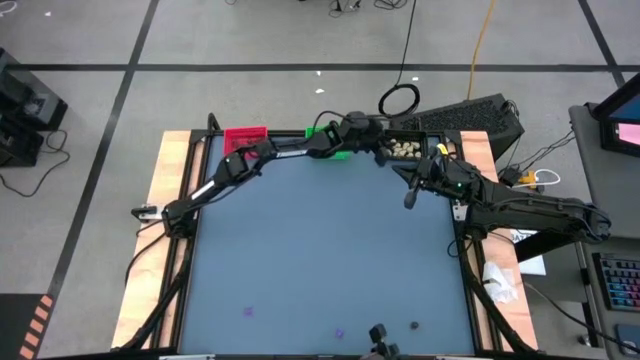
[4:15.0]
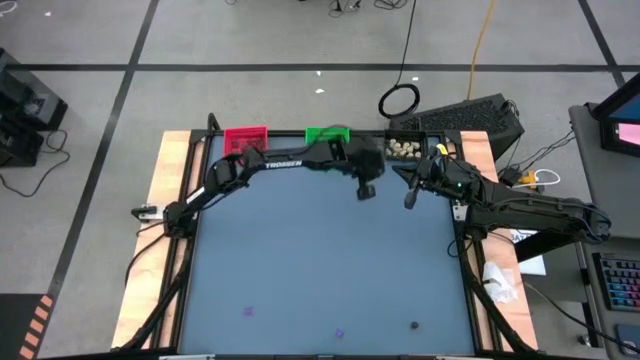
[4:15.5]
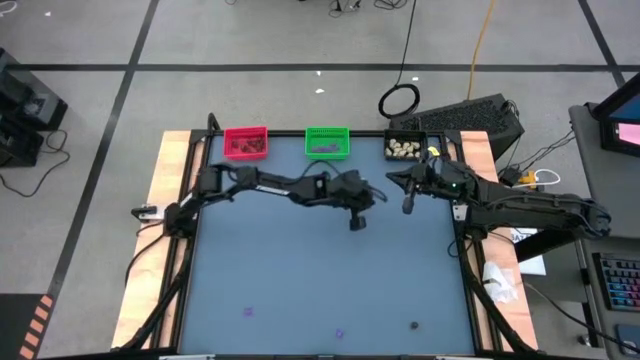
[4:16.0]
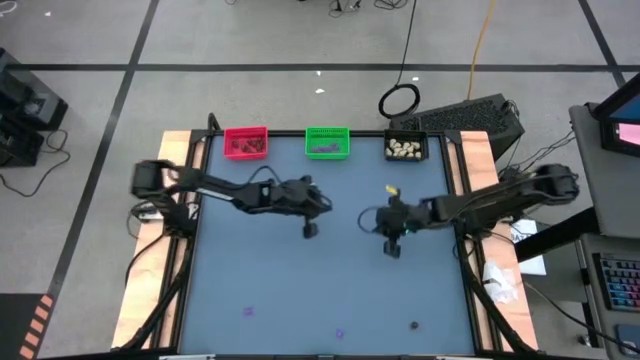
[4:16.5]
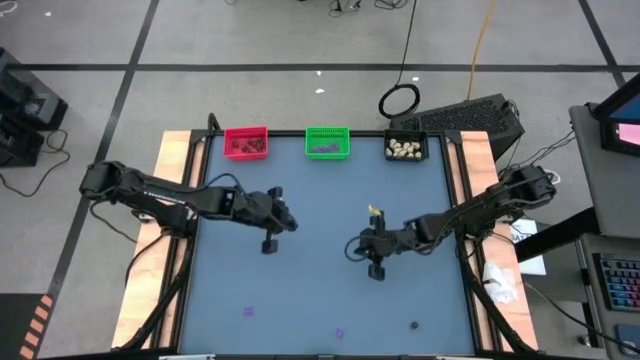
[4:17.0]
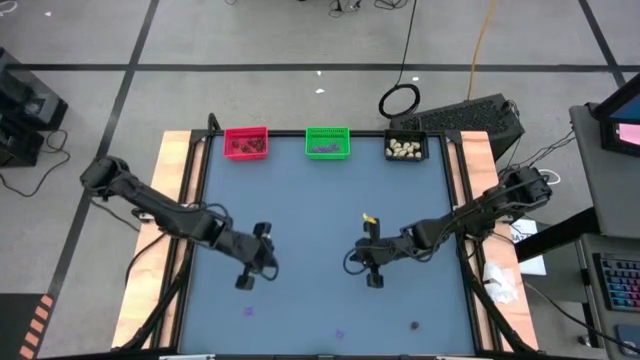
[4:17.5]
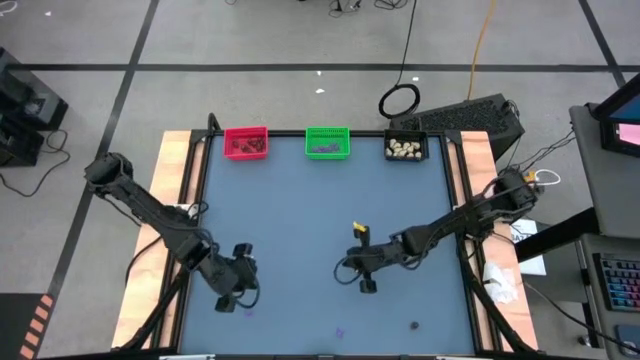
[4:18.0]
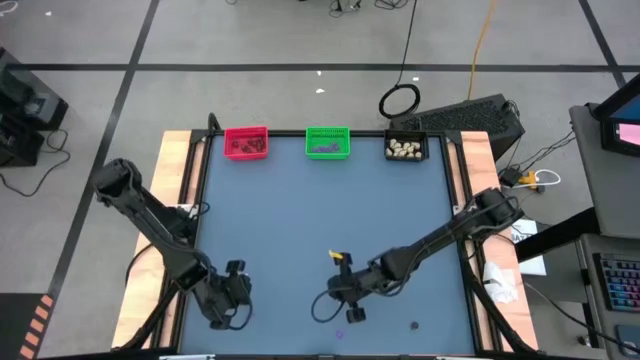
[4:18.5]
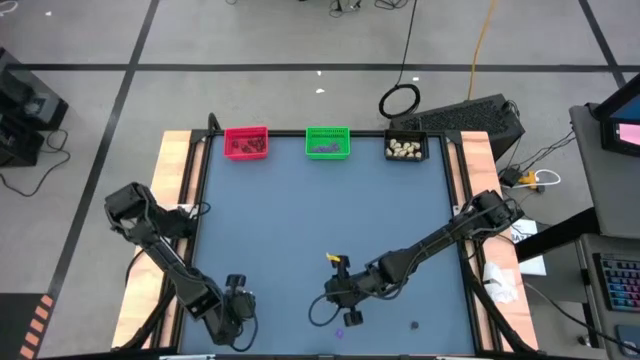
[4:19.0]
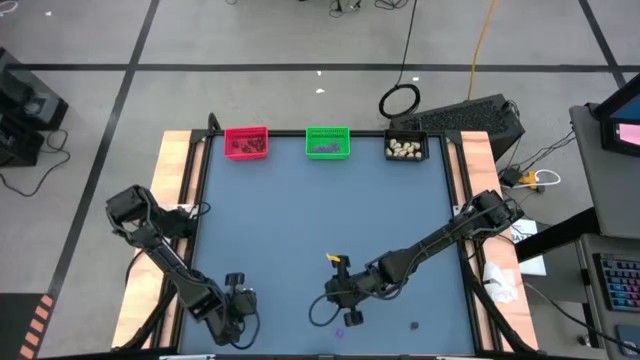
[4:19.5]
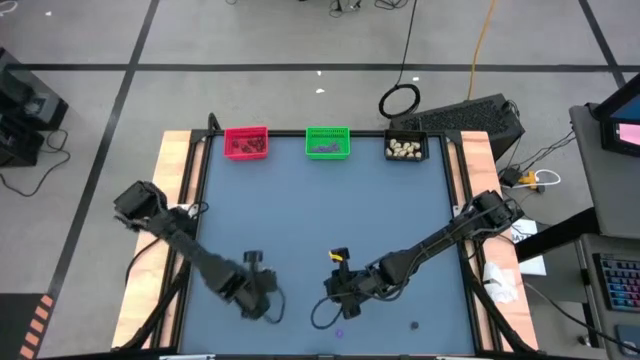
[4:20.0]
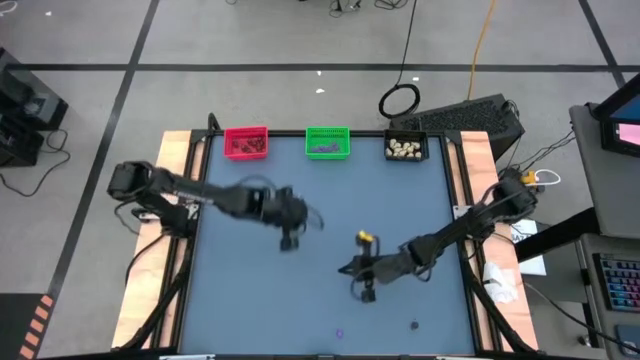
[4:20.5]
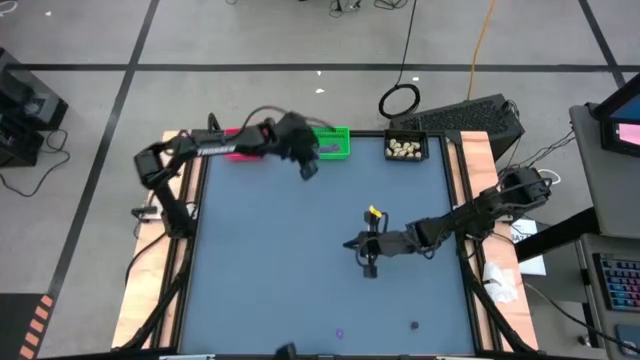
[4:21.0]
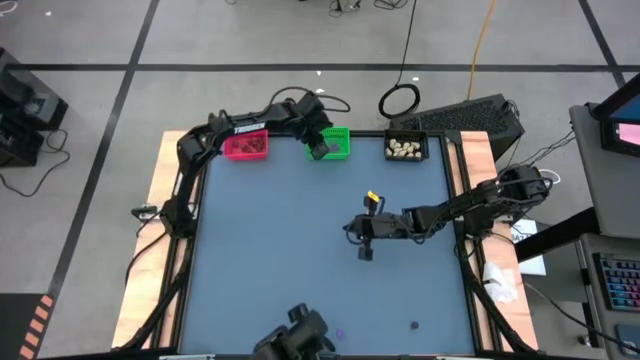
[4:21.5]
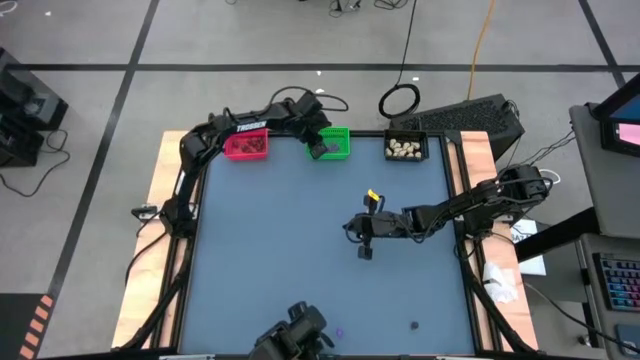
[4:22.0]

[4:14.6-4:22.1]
Task: Sort Halloween decoration
Put the purple spider toy into the green bin

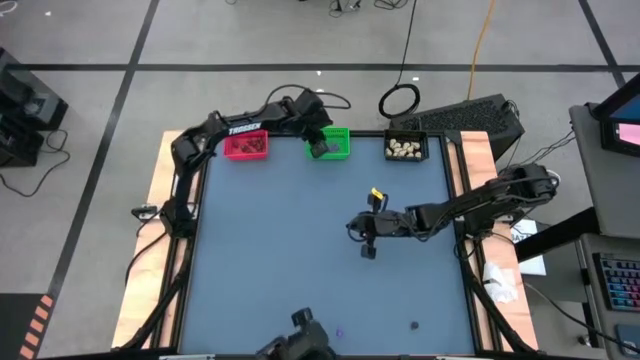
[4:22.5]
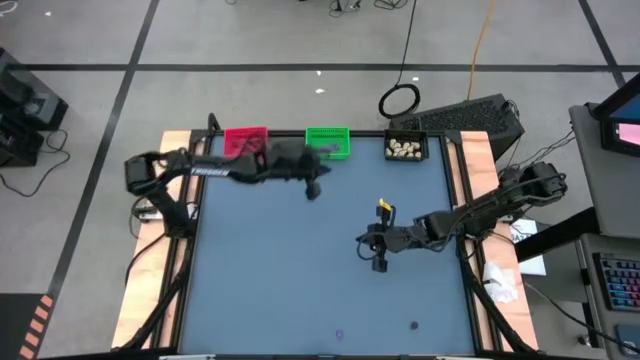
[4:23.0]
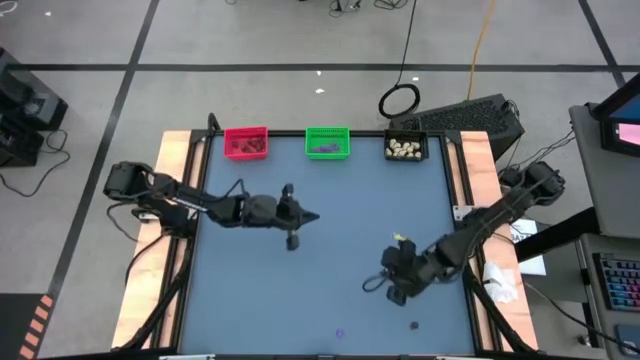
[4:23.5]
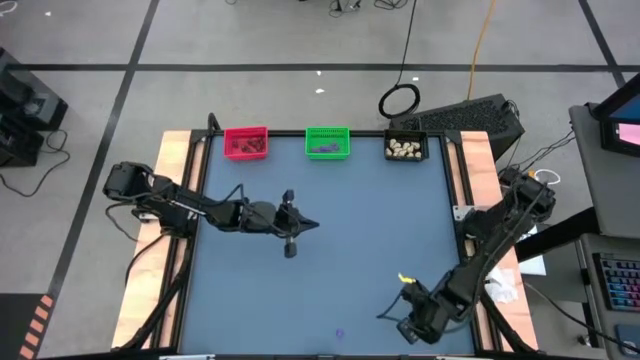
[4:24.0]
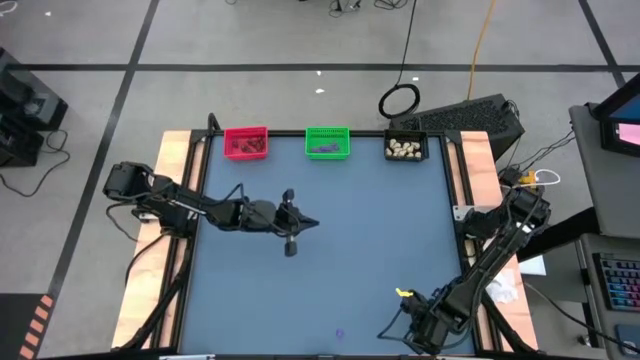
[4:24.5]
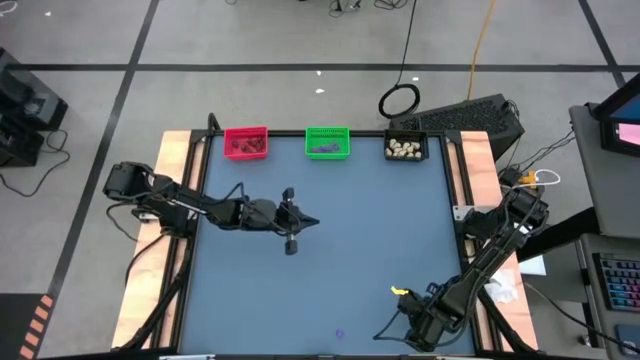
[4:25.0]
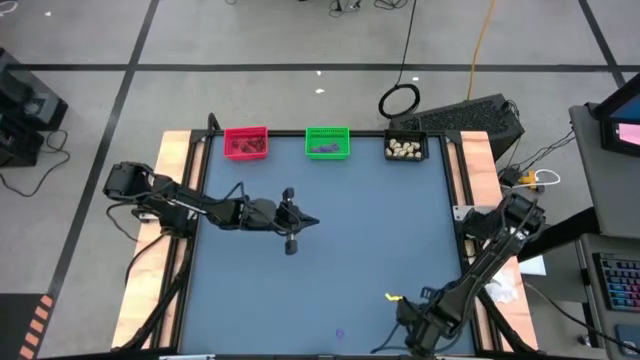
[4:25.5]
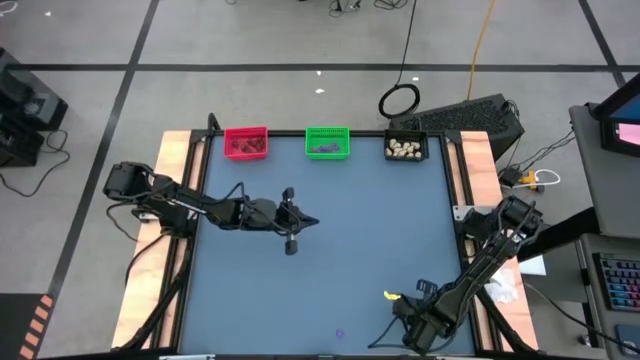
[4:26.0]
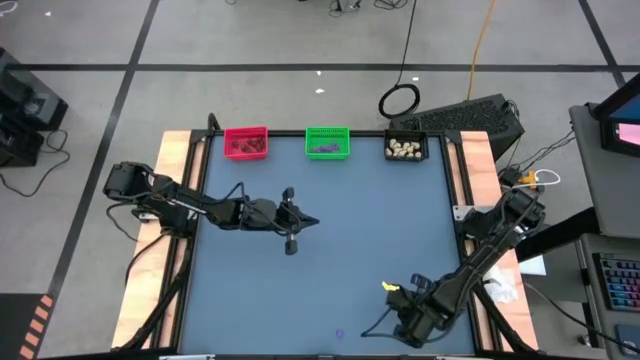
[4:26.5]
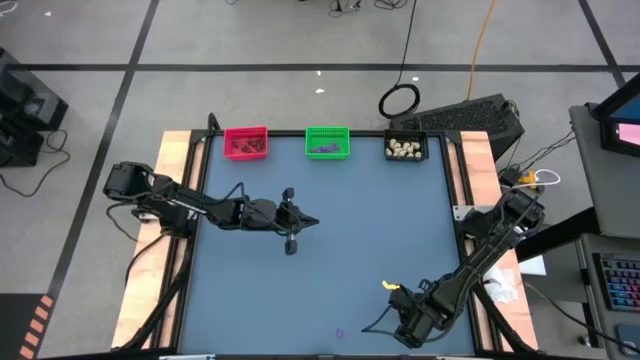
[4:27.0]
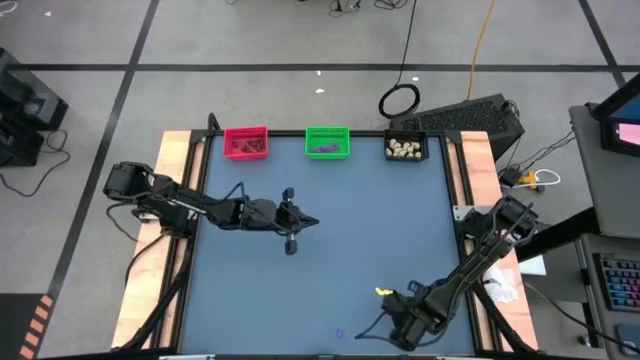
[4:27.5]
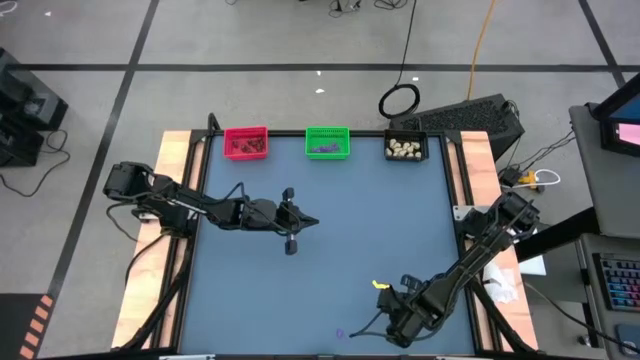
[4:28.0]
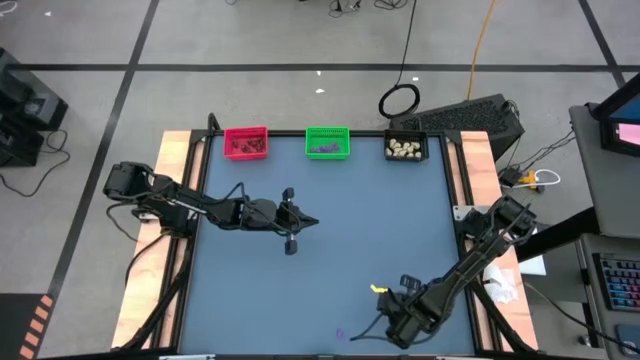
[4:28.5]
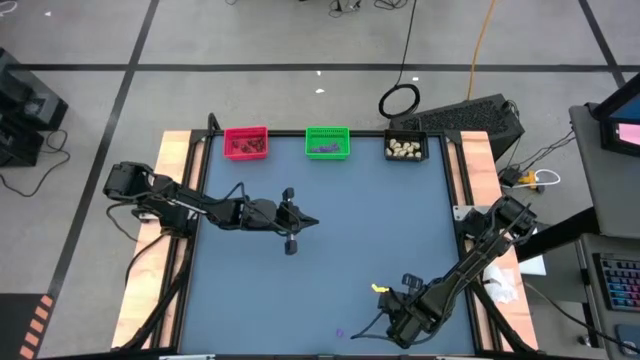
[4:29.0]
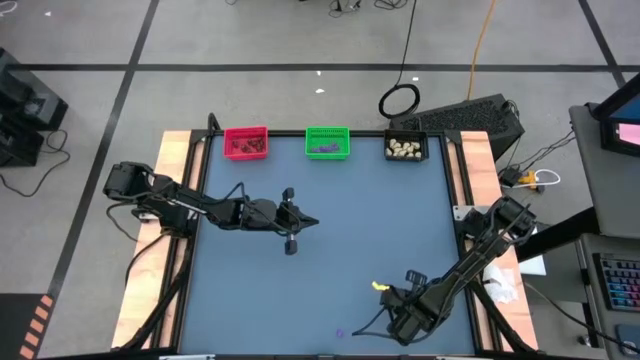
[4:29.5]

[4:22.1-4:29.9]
Put the black skull toy into the red bin

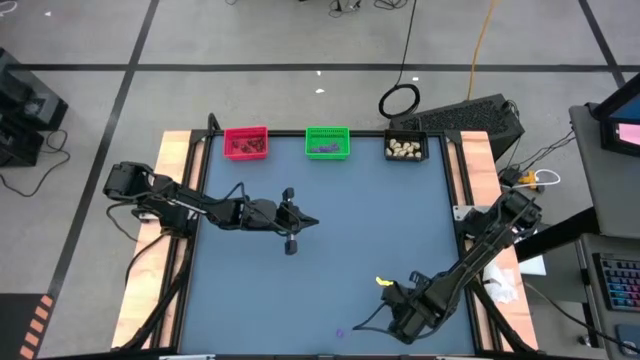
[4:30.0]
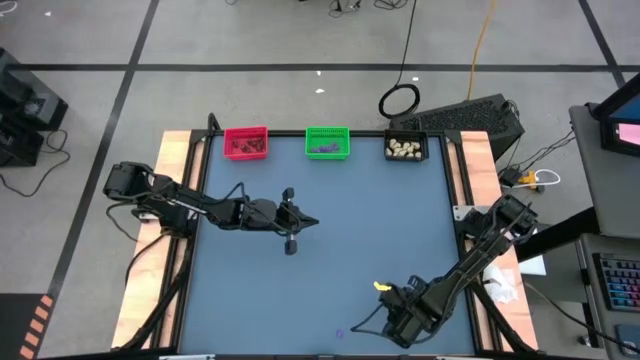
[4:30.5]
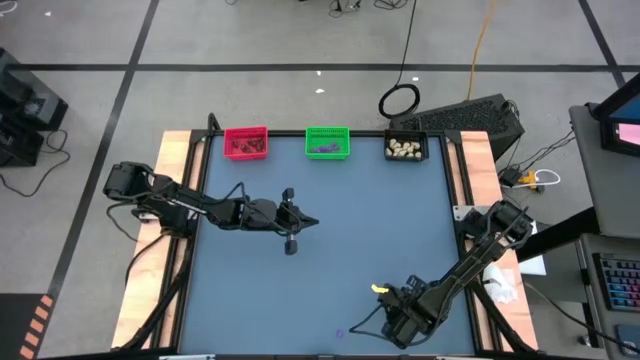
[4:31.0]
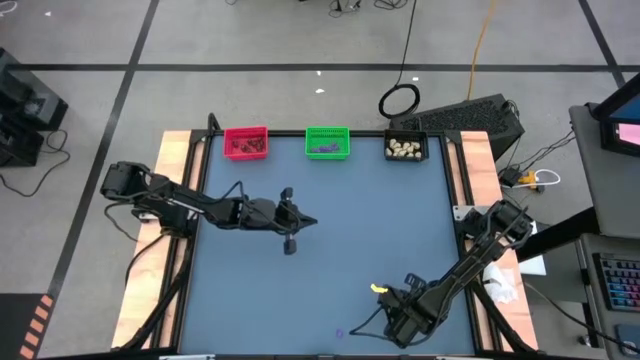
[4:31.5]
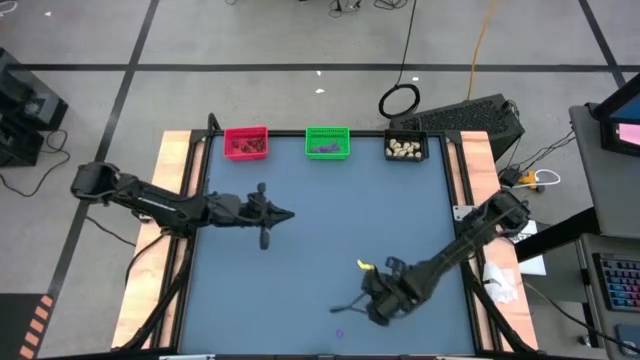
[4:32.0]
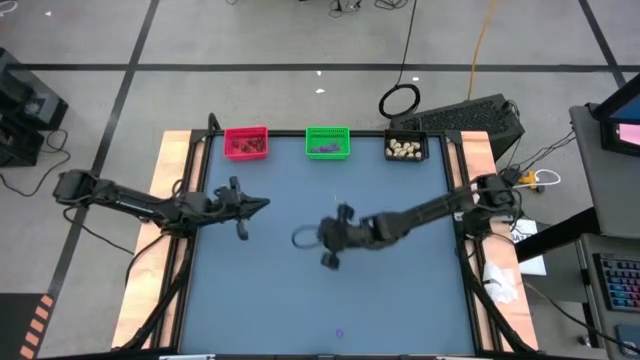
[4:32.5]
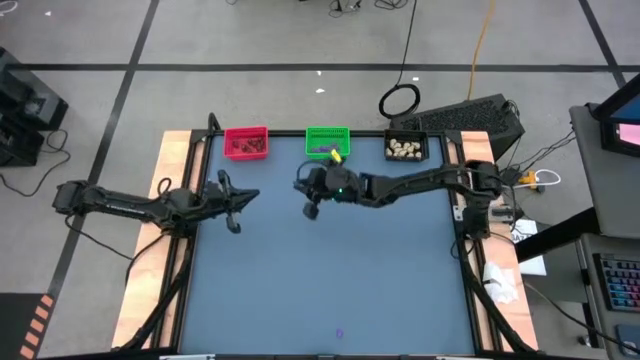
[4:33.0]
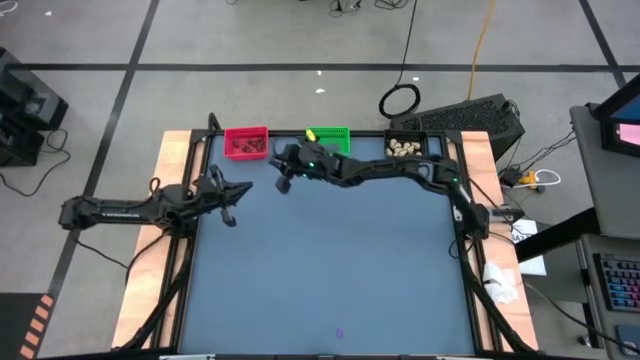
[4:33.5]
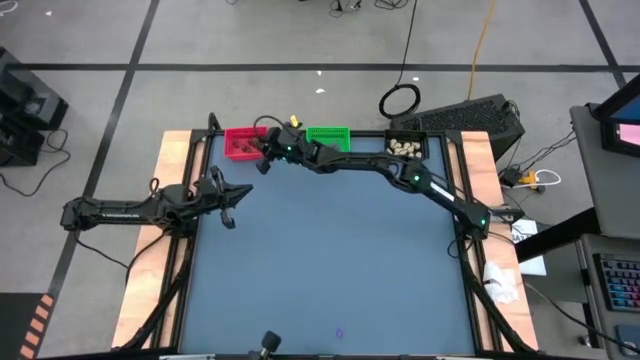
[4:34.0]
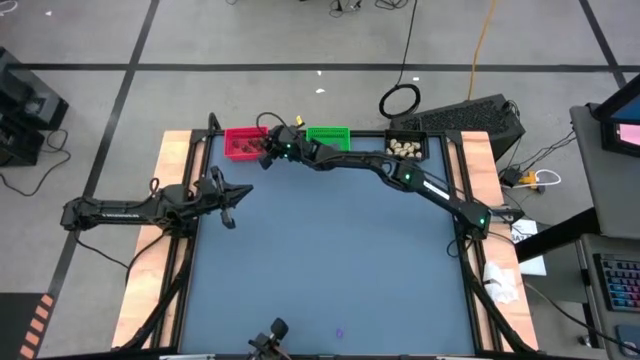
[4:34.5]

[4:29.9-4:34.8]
Put the black skull toy into the red bin

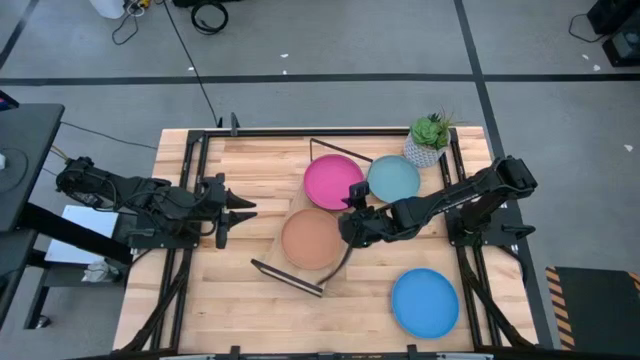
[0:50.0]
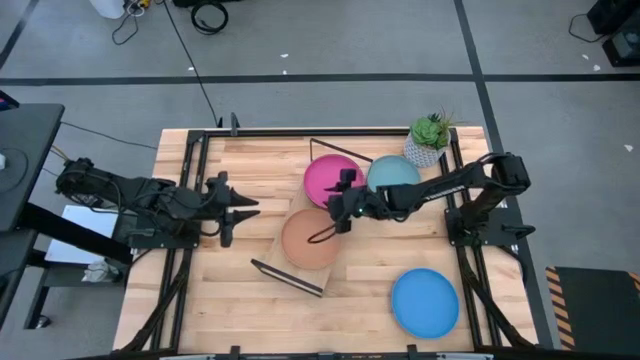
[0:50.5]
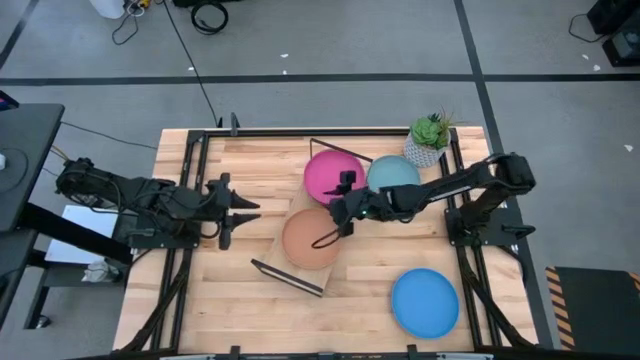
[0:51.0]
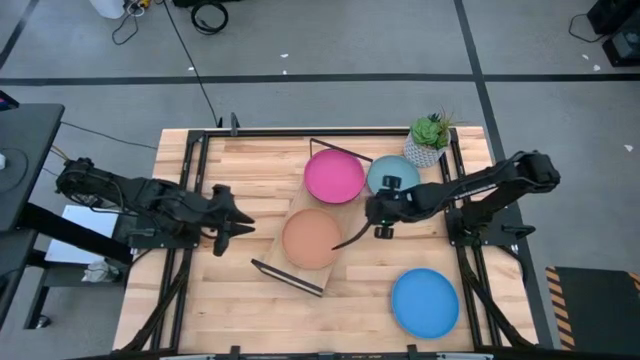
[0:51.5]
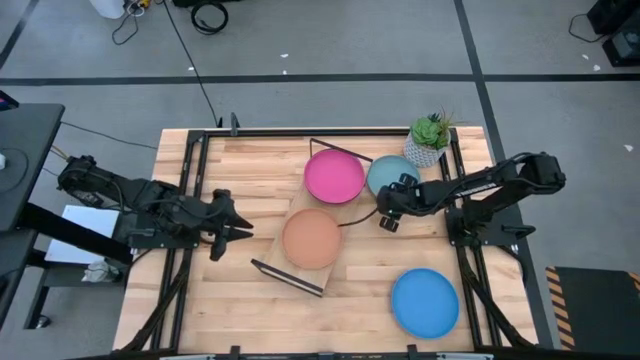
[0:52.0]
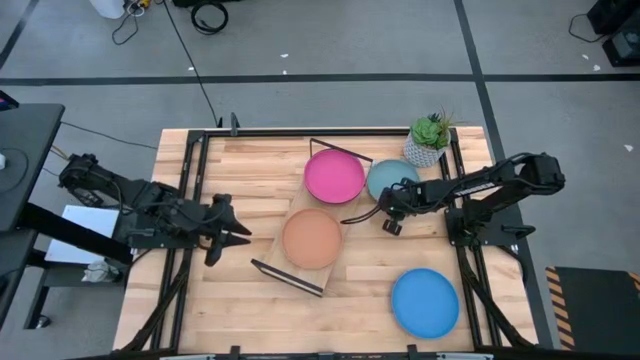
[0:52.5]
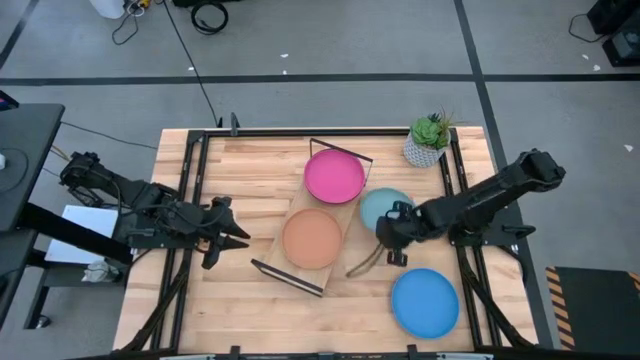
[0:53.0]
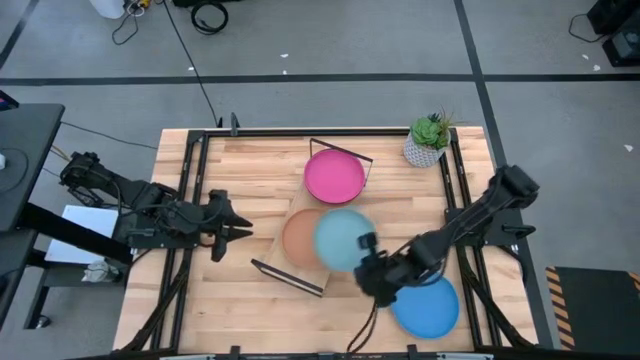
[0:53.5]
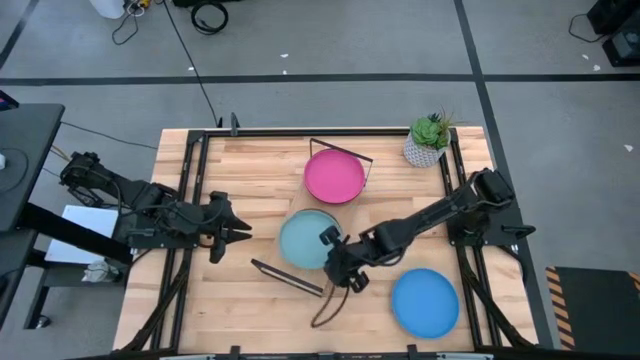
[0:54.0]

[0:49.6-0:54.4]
Task: Place and stack plates onto a shelf
Stack the light green plate on the brown plate
